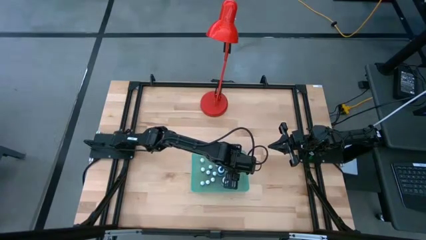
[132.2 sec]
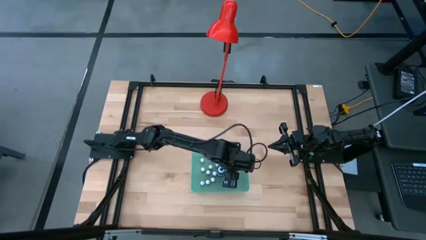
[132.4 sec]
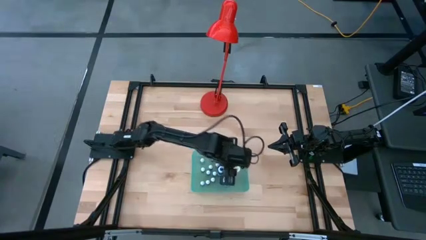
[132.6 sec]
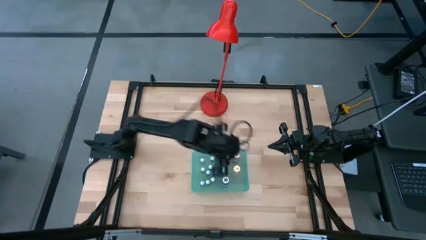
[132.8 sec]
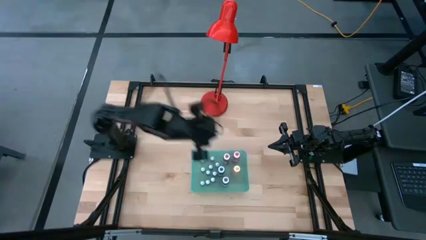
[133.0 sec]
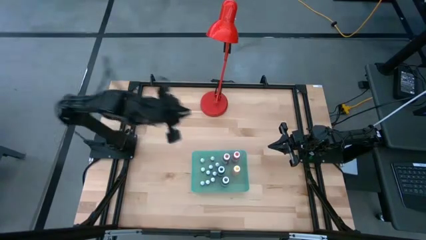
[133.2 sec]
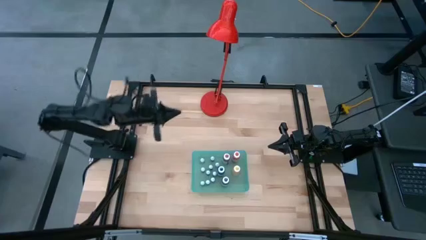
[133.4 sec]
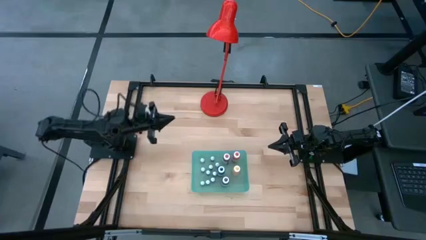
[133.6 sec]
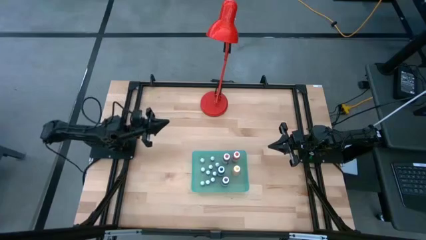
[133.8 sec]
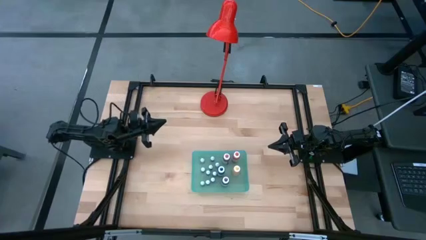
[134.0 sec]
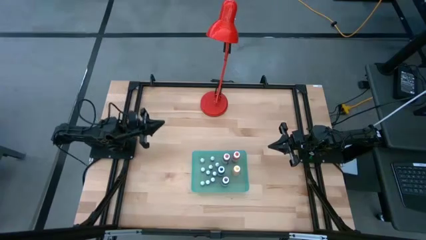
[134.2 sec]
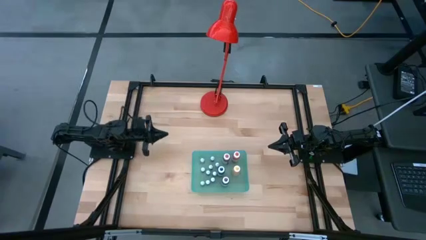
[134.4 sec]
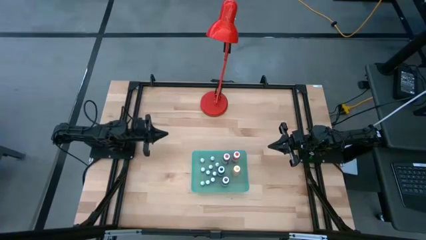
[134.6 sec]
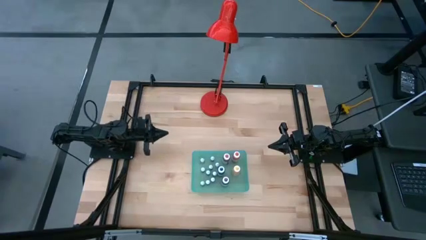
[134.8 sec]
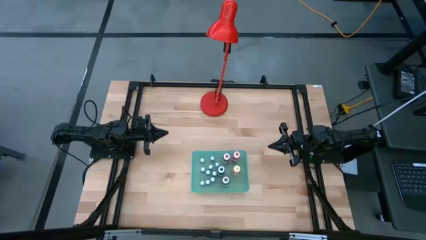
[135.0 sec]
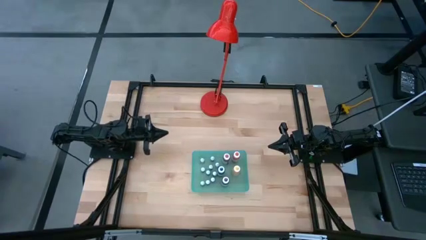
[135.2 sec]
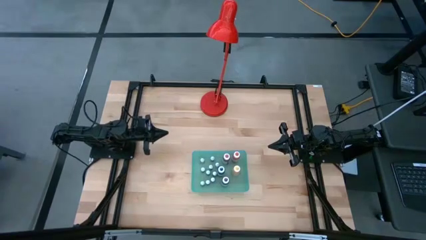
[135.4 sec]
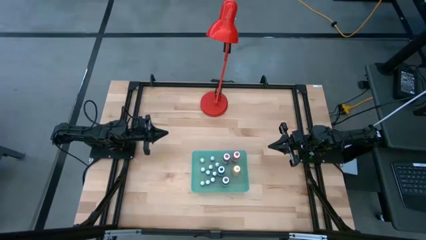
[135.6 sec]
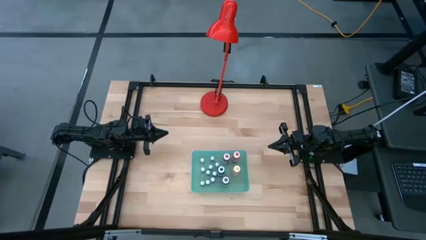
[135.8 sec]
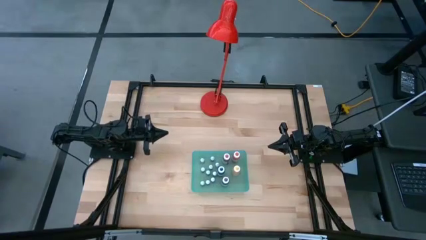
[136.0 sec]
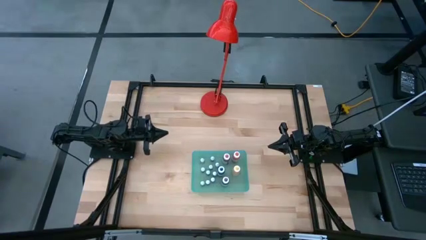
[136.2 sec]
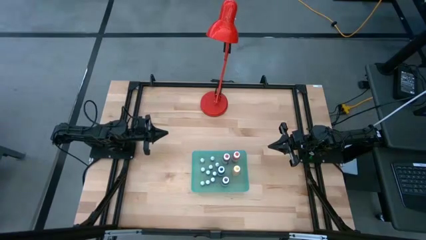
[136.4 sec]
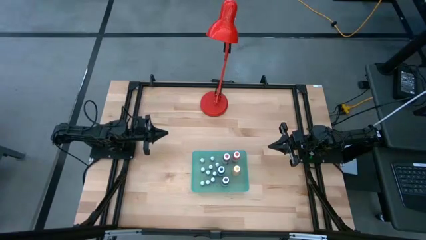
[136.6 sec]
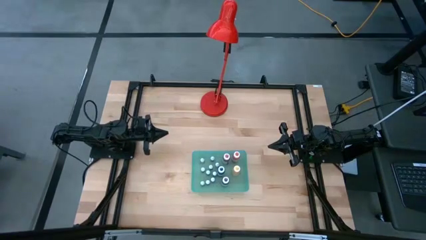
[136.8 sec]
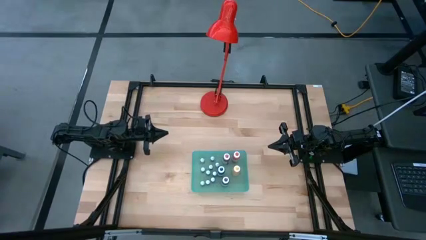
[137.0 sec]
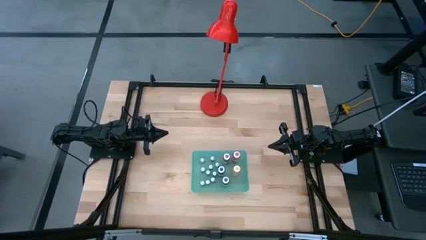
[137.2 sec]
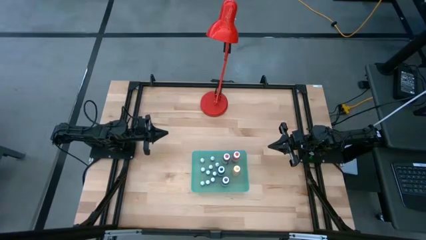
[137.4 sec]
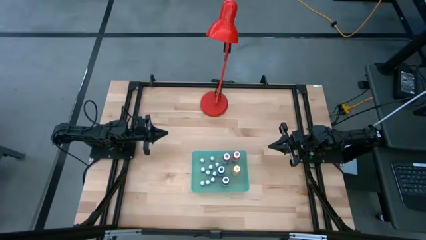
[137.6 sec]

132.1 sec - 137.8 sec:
Task: Pick & Place food coloring
Return to Home Position

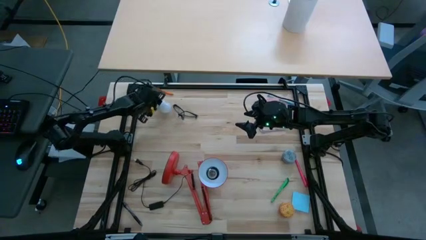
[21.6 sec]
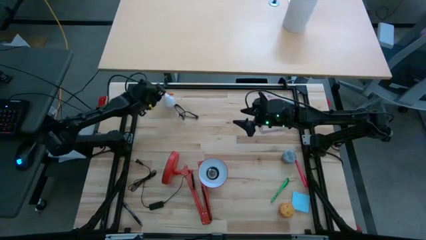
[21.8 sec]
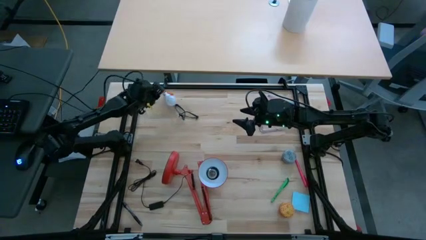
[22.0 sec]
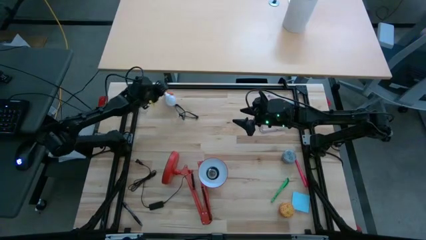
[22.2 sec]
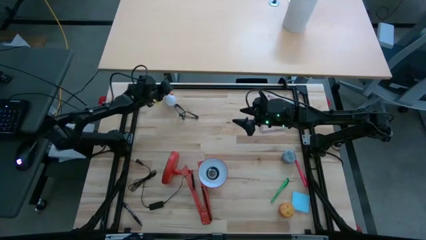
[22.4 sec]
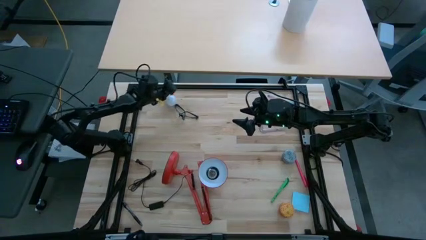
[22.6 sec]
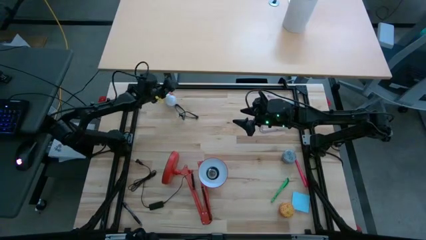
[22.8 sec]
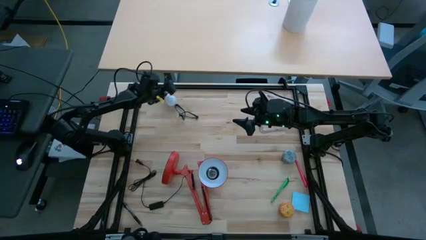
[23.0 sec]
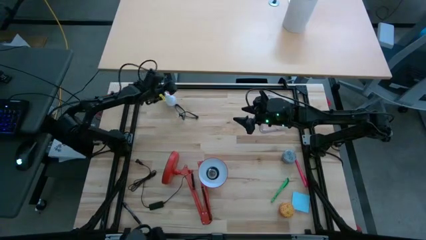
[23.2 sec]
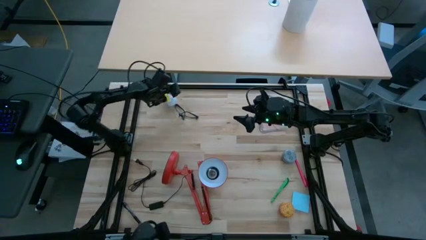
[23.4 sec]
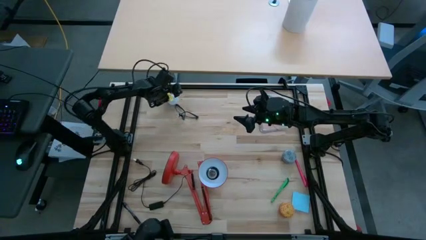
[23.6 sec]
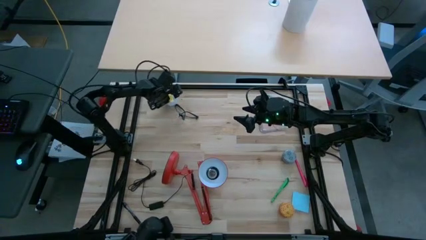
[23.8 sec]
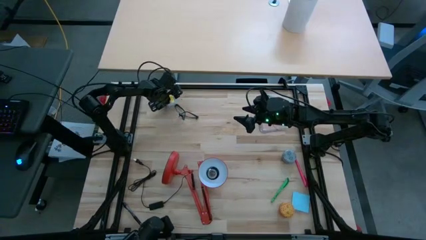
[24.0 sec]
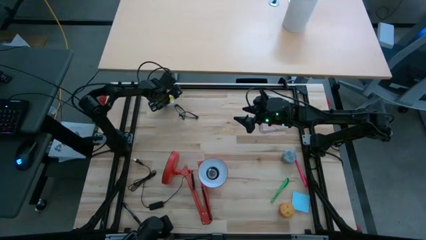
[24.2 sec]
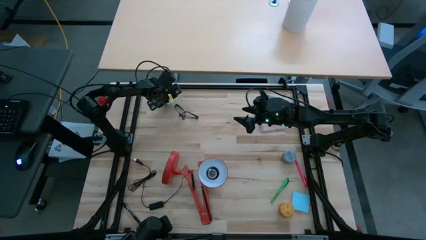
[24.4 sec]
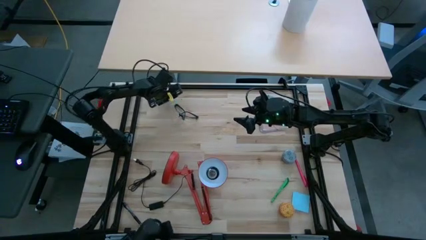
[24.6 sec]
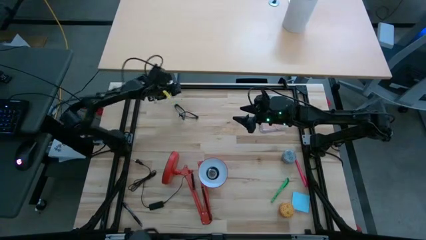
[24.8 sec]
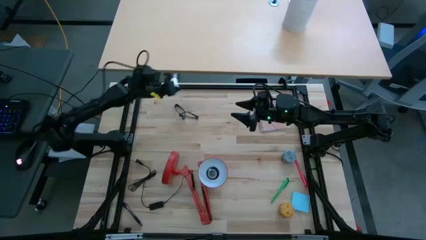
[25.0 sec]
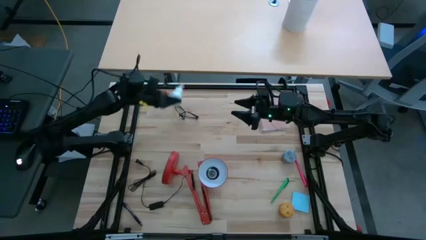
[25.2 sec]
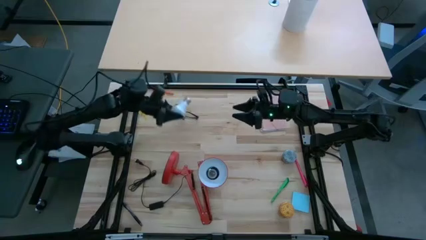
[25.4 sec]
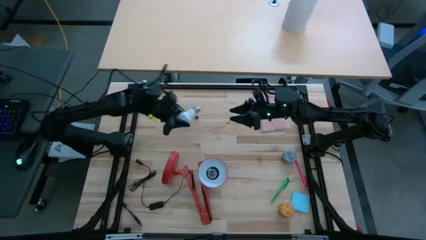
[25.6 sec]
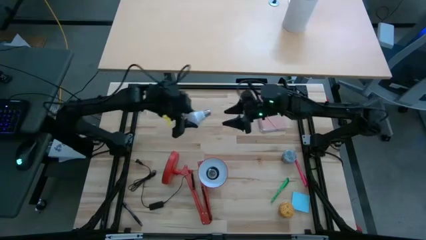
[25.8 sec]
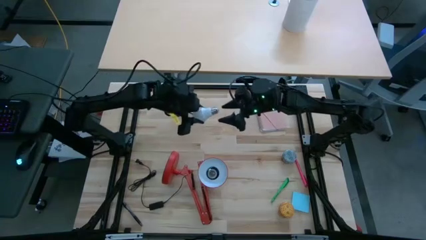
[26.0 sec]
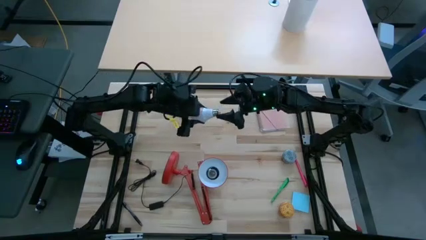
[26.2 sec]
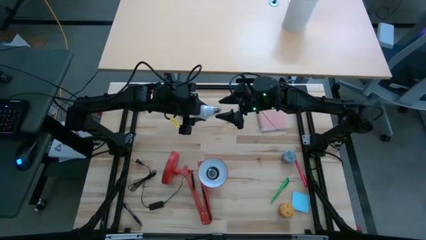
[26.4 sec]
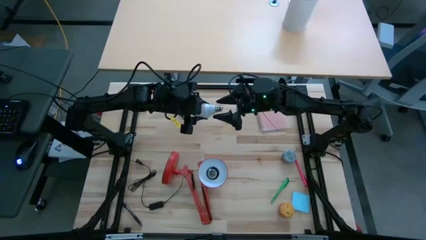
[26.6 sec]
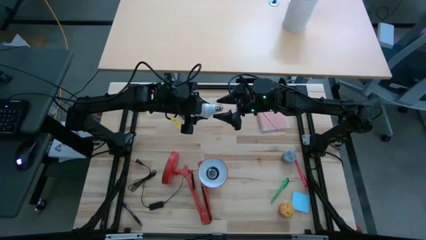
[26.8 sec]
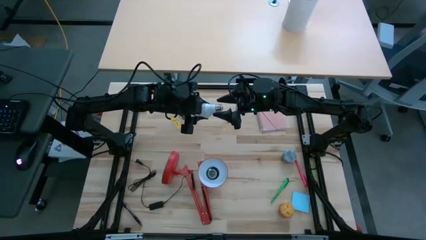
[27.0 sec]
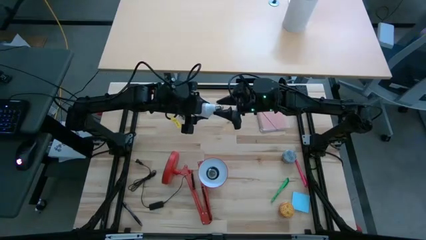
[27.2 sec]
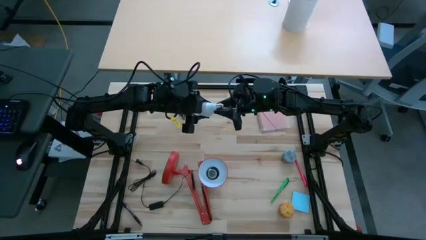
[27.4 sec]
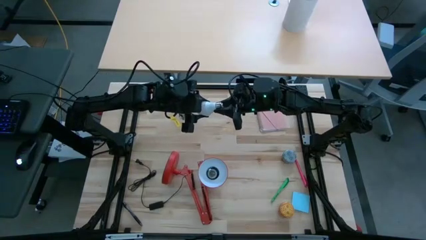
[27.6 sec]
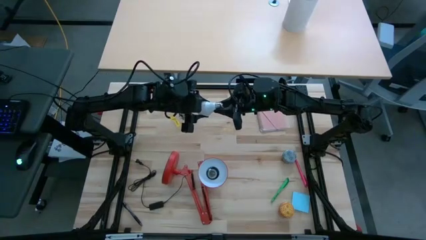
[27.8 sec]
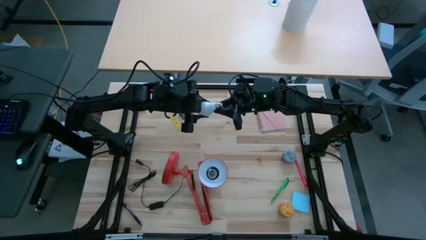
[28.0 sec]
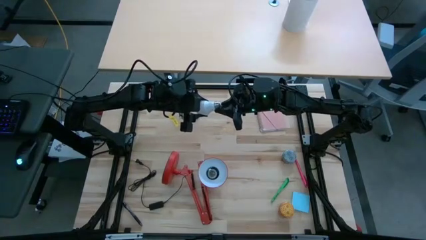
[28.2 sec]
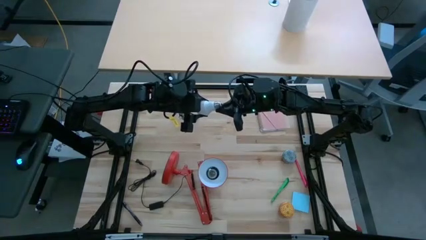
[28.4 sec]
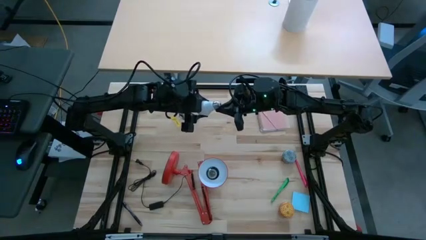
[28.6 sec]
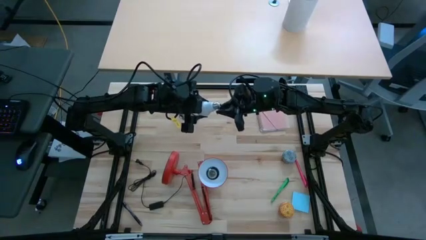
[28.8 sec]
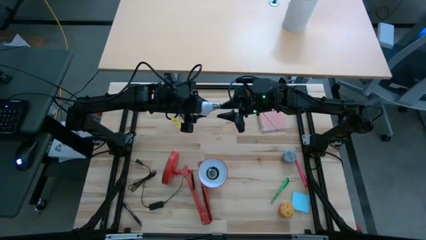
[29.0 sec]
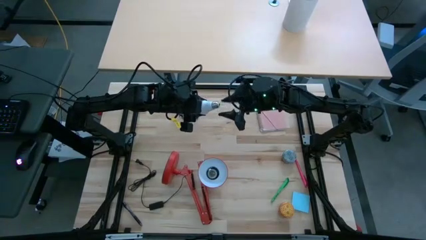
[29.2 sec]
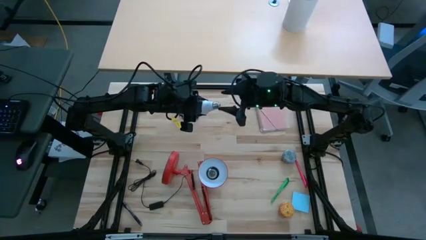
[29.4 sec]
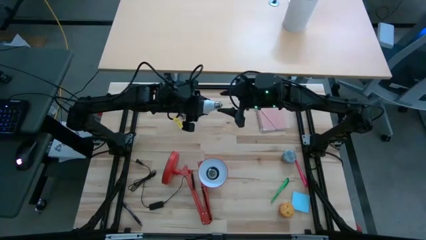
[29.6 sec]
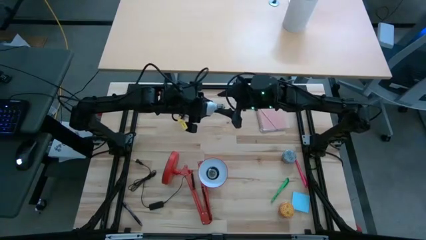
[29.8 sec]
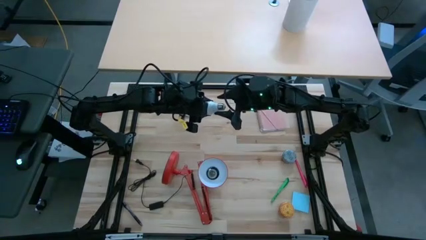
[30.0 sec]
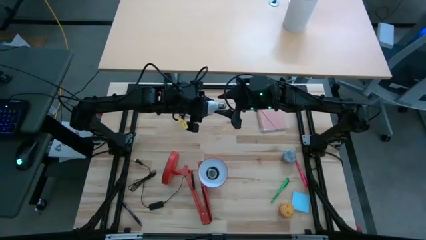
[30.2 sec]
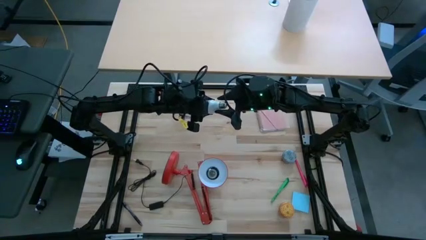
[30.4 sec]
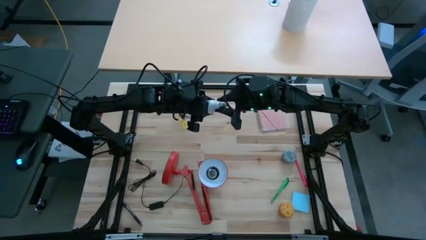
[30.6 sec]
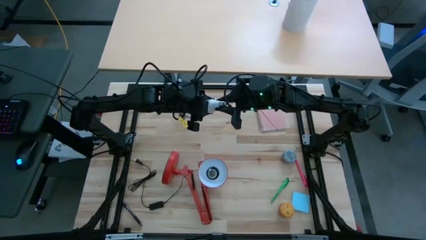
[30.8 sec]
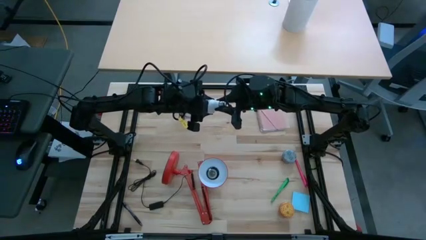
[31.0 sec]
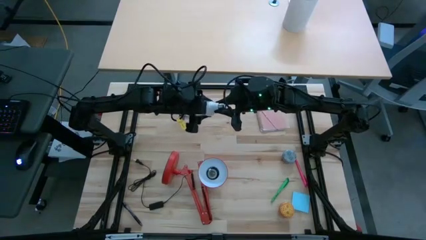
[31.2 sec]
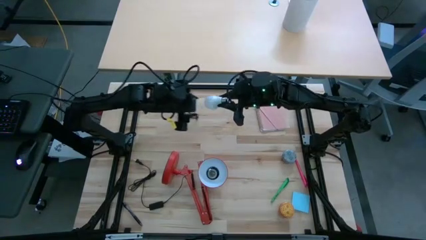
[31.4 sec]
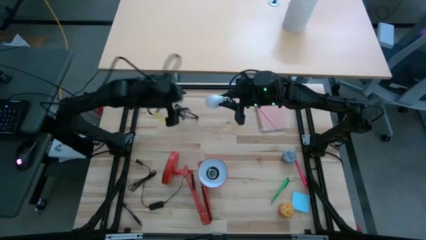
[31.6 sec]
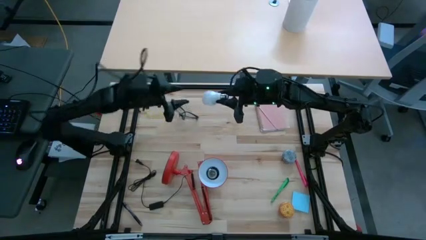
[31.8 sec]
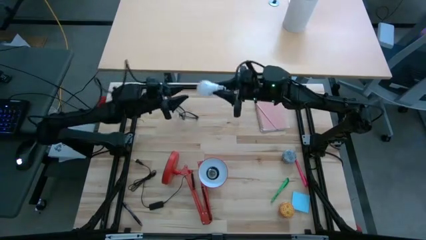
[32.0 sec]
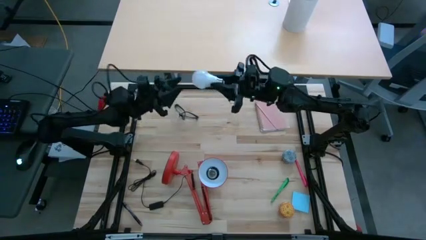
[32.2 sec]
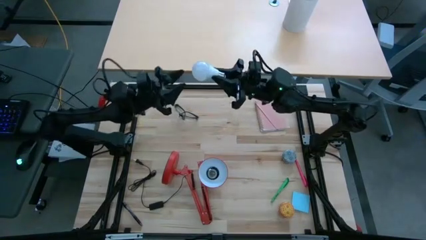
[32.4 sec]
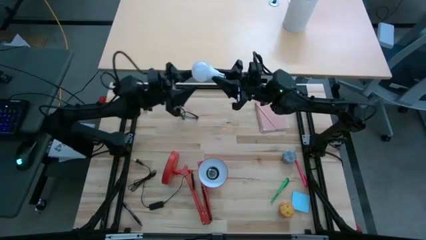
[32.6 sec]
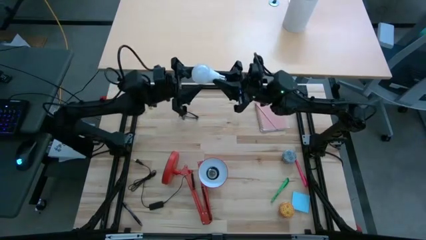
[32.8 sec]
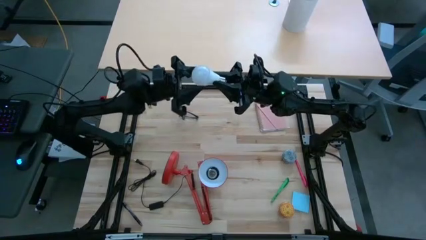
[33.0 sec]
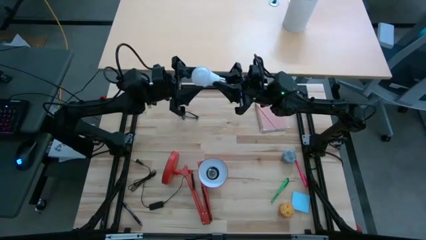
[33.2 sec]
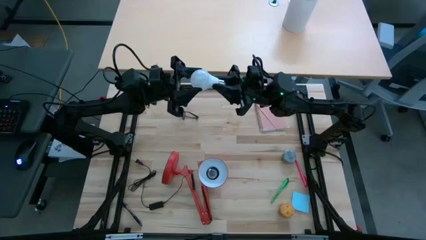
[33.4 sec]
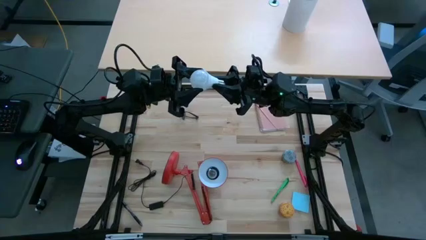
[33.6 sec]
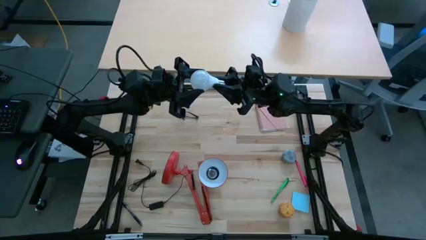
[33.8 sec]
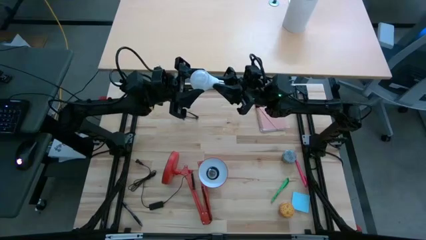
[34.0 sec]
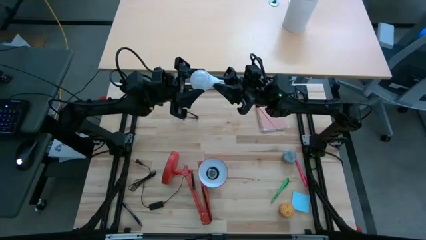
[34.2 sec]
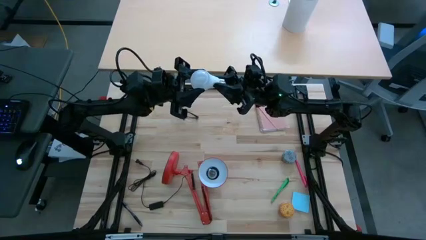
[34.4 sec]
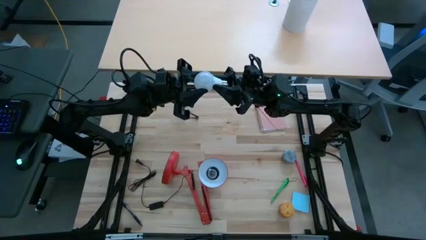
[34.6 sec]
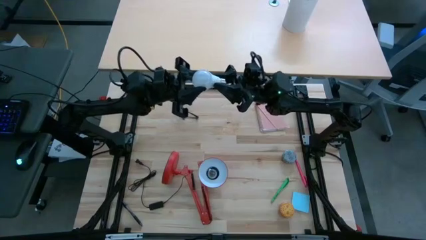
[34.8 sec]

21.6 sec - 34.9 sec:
Task: Screw lightbulb
Insert the lightbulb into the lamp
